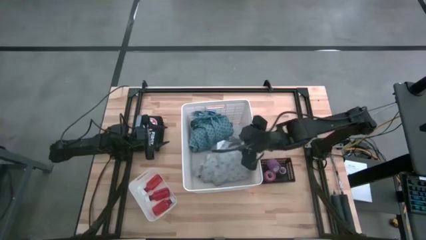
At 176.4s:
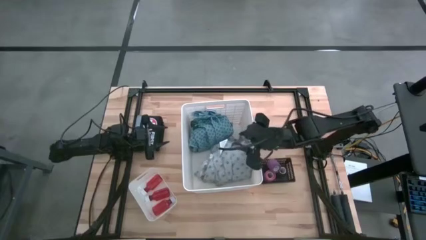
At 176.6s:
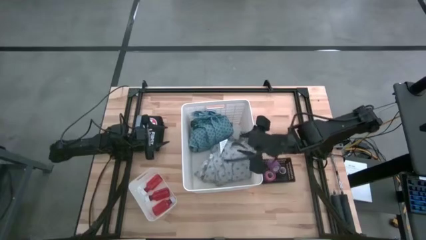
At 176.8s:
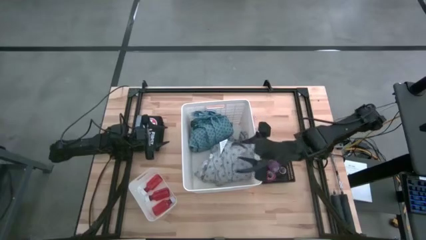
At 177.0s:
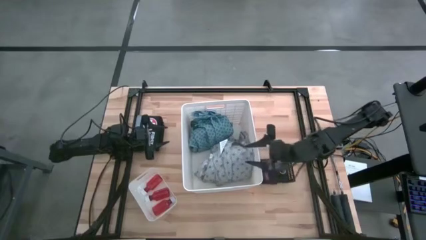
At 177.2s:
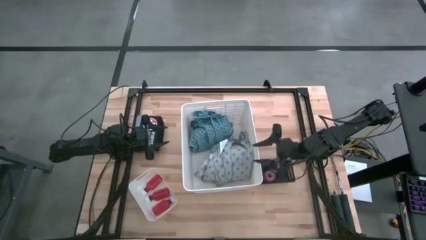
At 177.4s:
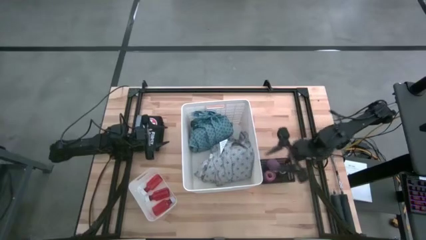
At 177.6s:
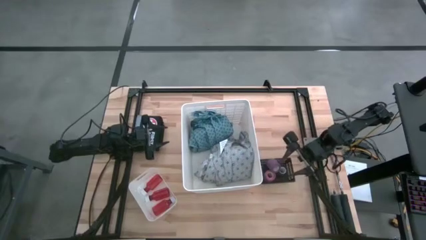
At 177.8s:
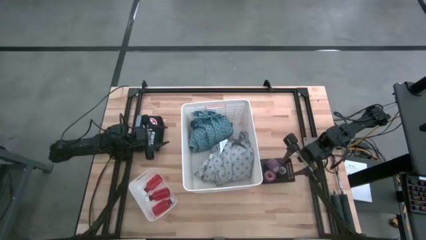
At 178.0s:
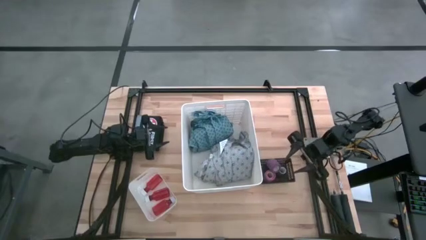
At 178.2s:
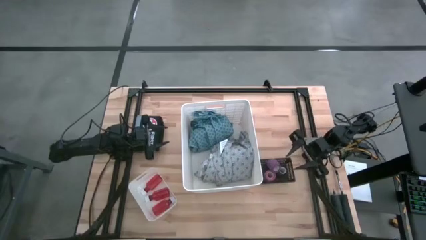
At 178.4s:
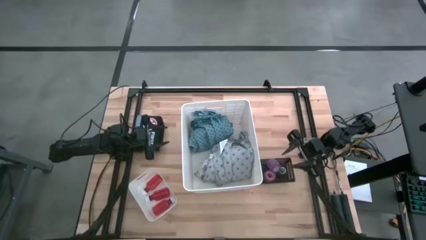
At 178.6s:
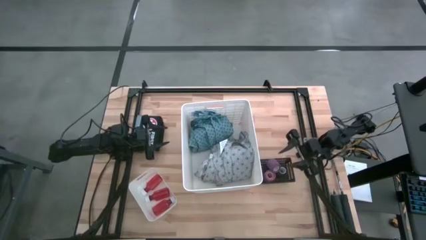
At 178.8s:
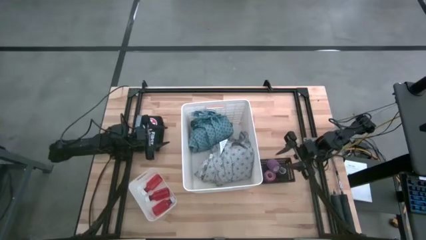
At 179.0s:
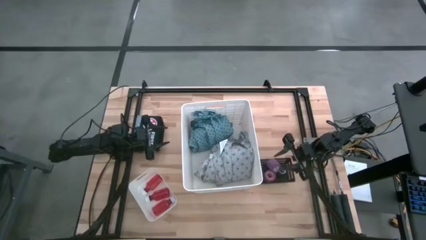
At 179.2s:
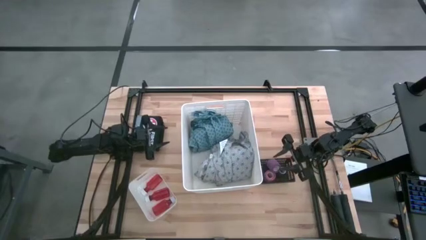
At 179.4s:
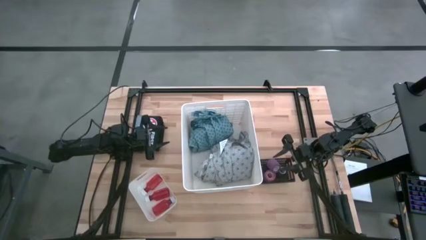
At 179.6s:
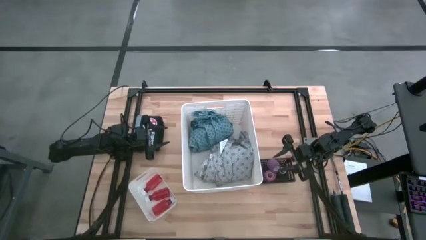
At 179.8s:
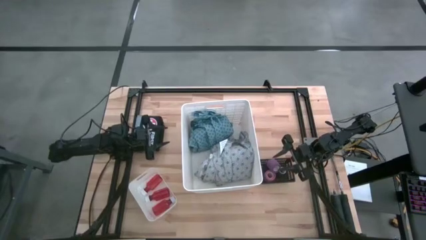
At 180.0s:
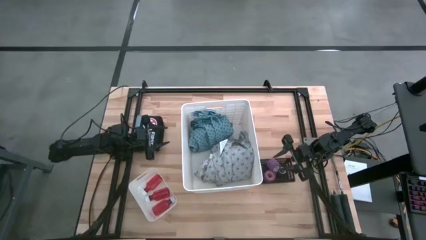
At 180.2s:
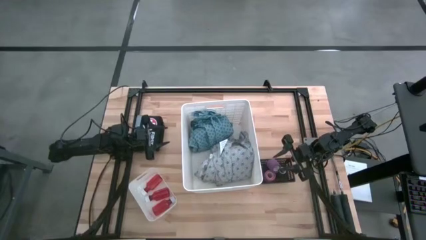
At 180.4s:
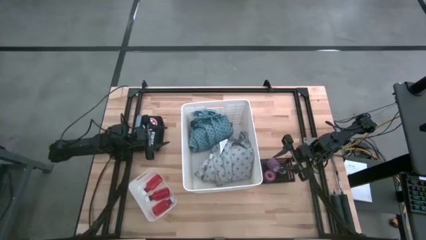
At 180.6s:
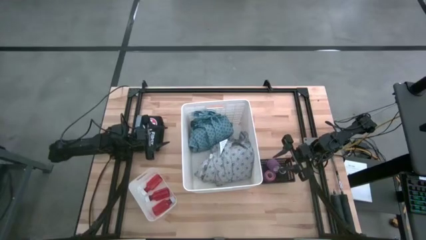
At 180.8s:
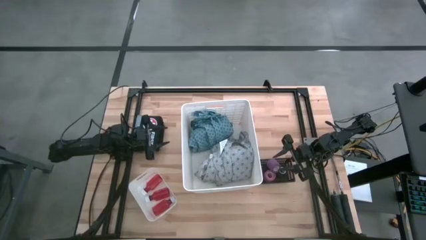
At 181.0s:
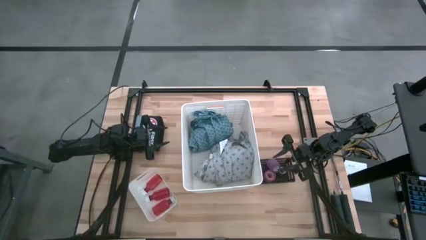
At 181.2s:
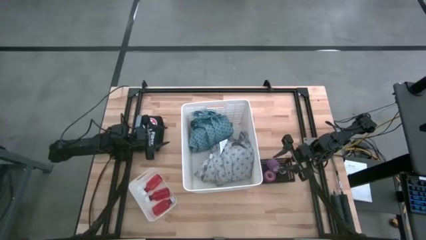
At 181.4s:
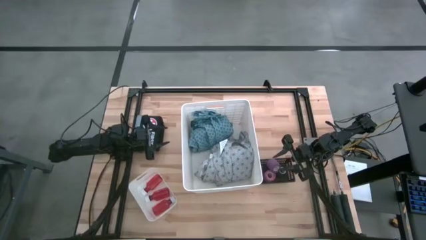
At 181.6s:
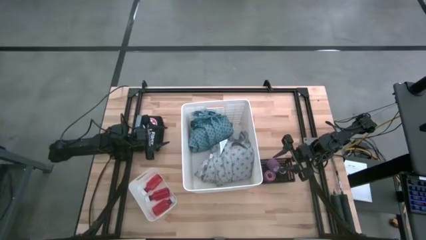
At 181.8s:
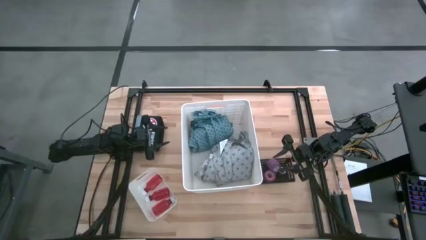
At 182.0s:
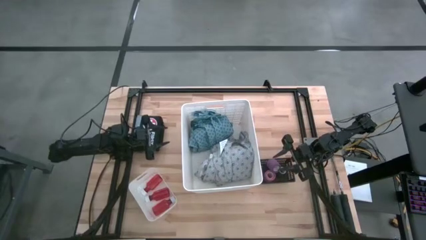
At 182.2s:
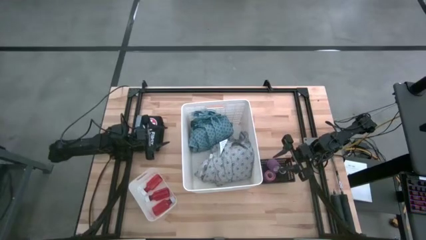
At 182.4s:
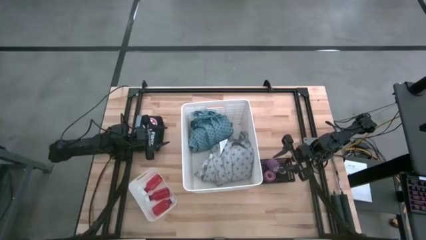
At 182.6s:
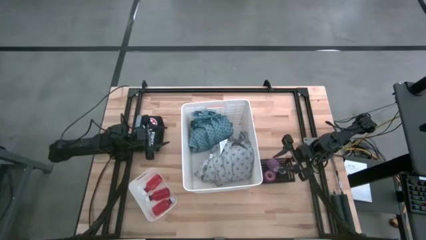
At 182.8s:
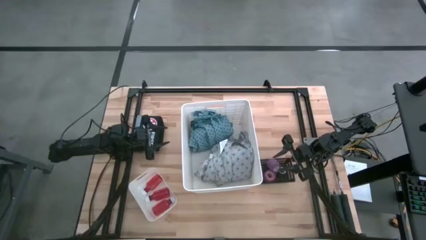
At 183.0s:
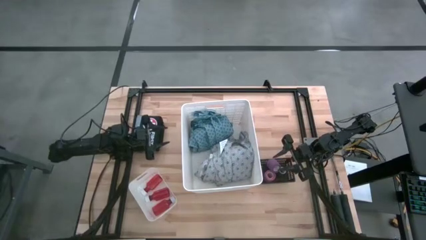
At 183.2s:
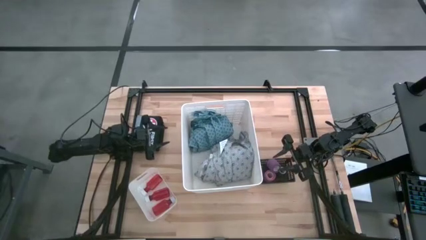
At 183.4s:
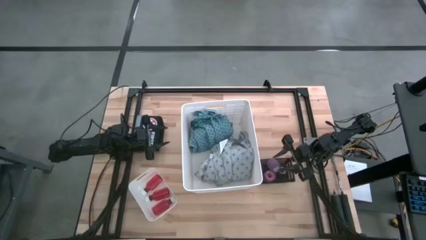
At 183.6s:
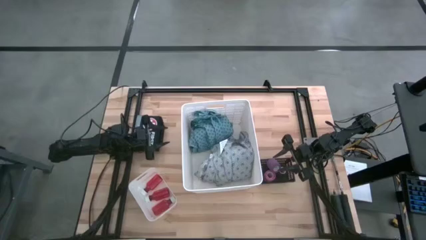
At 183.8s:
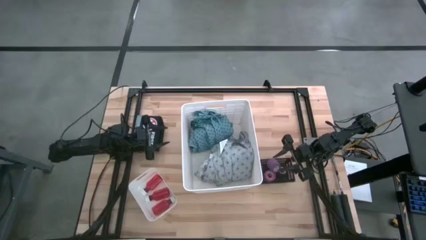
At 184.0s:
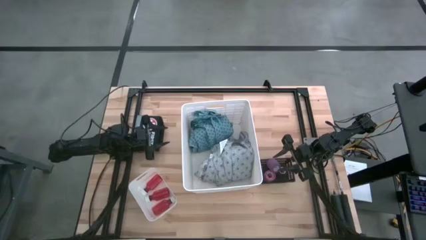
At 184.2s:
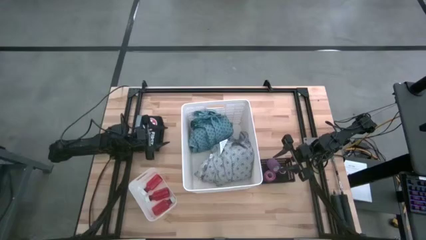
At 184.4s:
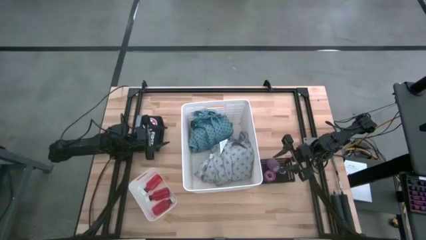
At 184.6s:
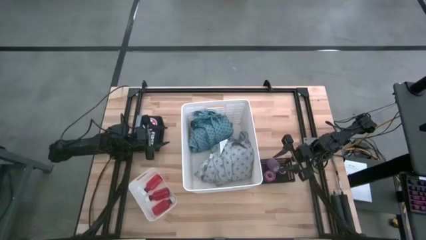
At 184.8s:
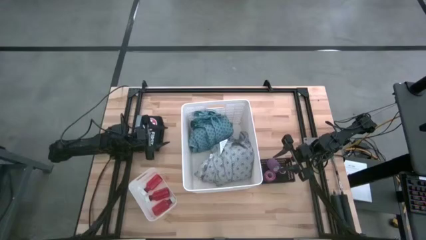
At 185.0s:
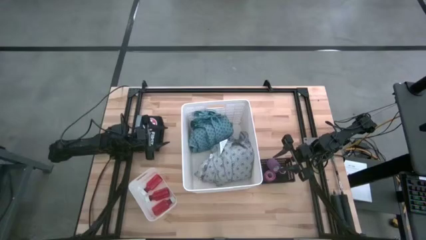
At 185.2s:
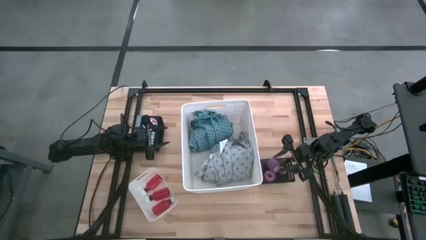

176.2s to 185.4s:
Task: Pick & place medical supplies in basket/bin
Return to Home Position

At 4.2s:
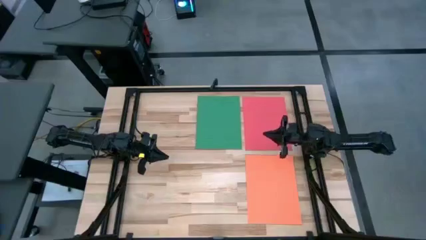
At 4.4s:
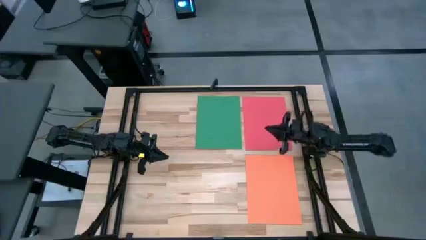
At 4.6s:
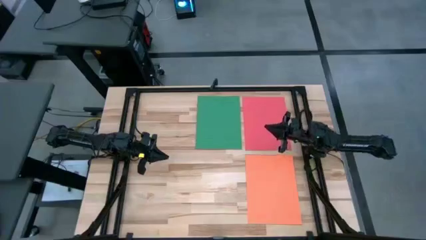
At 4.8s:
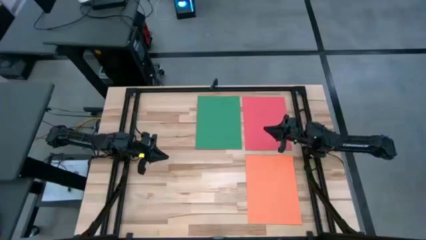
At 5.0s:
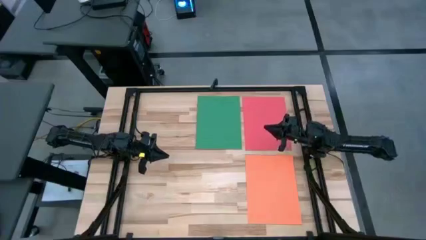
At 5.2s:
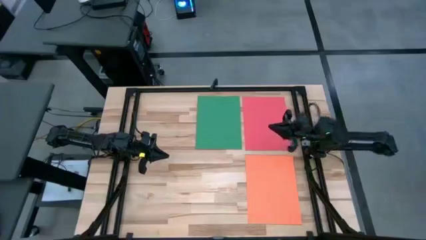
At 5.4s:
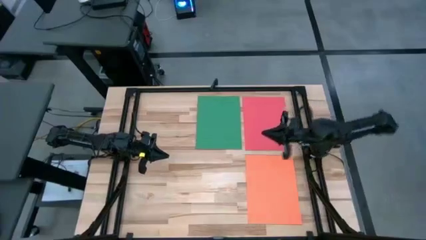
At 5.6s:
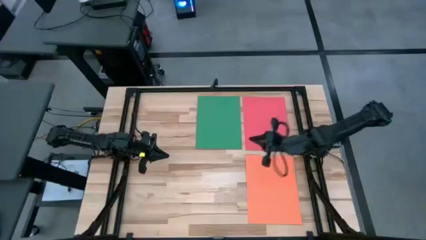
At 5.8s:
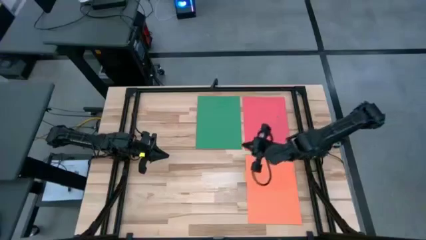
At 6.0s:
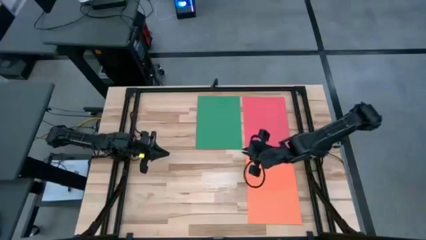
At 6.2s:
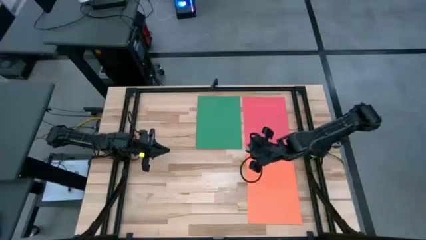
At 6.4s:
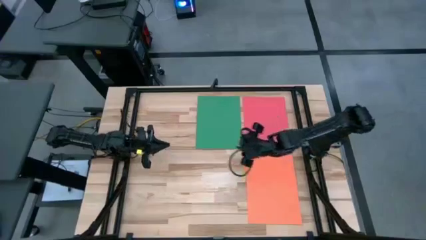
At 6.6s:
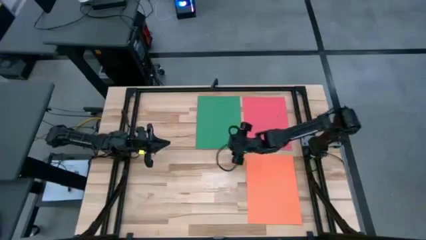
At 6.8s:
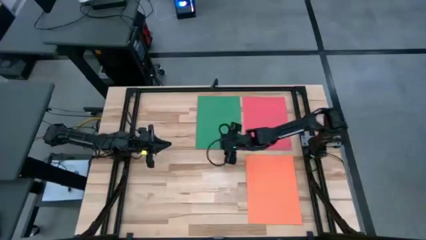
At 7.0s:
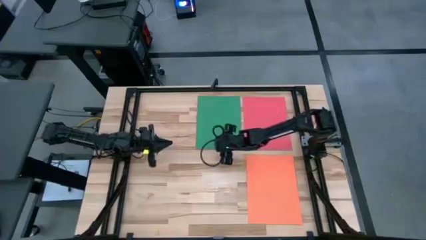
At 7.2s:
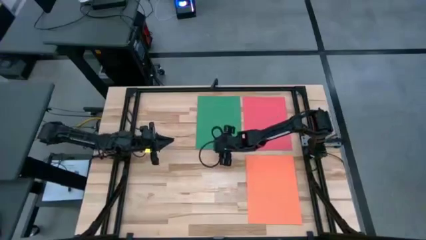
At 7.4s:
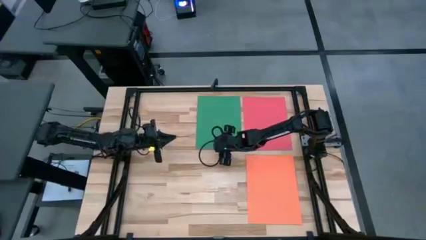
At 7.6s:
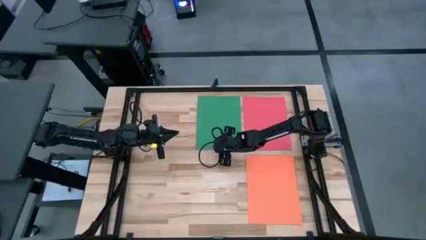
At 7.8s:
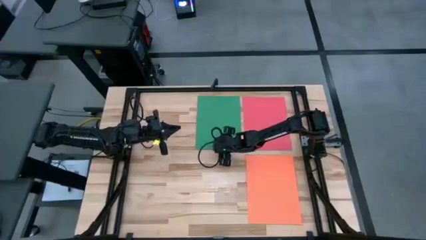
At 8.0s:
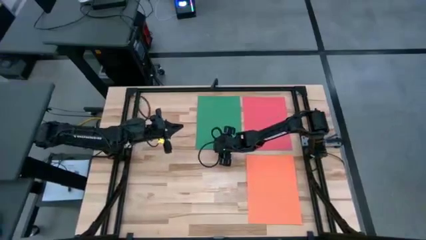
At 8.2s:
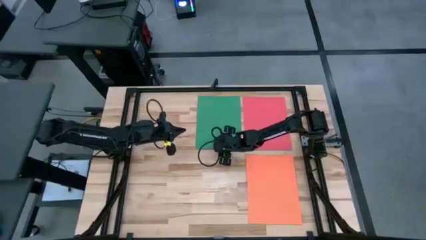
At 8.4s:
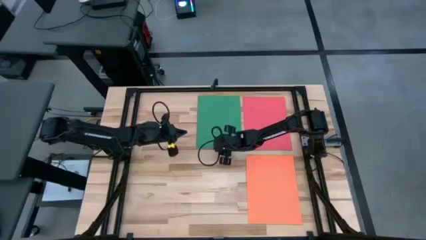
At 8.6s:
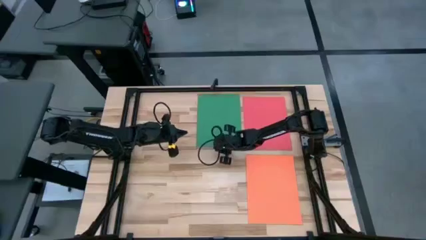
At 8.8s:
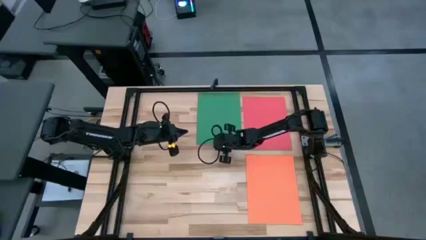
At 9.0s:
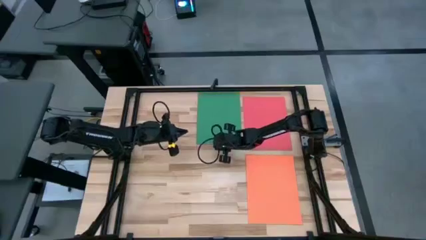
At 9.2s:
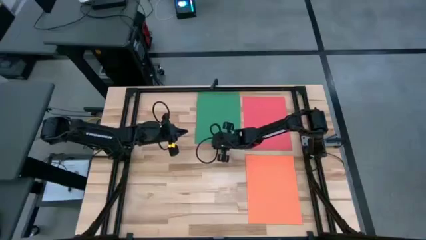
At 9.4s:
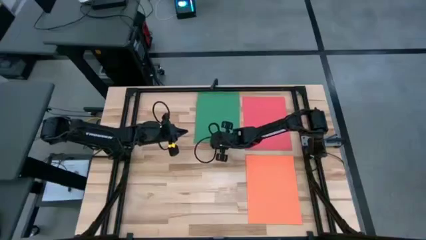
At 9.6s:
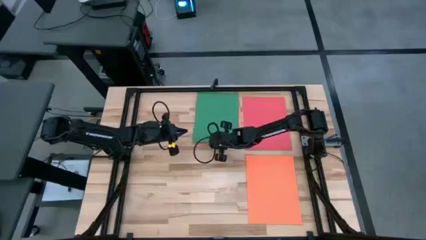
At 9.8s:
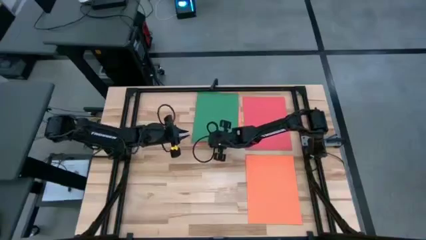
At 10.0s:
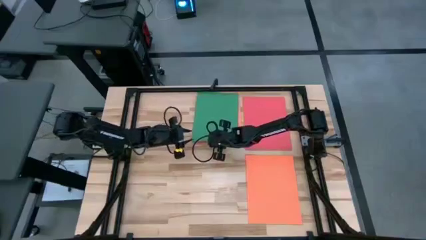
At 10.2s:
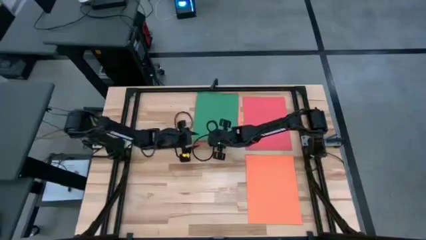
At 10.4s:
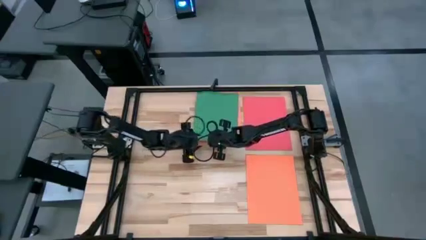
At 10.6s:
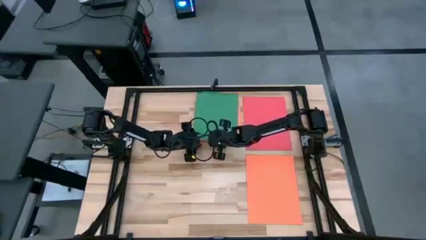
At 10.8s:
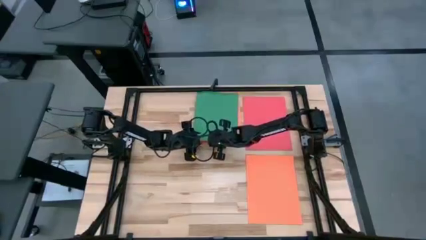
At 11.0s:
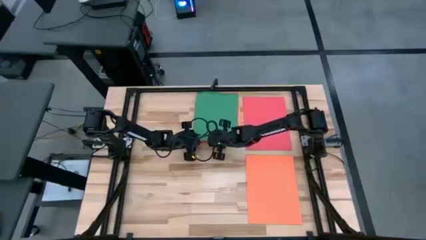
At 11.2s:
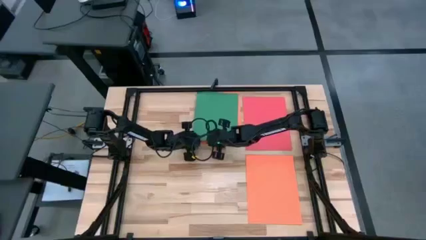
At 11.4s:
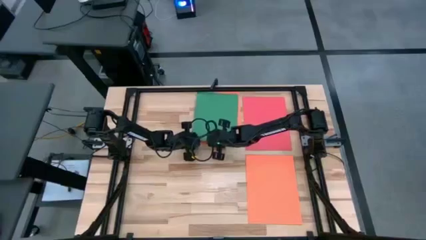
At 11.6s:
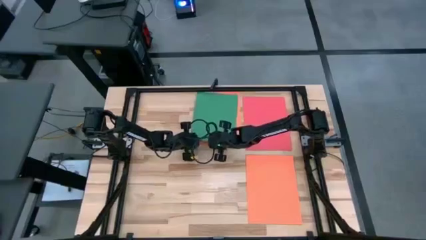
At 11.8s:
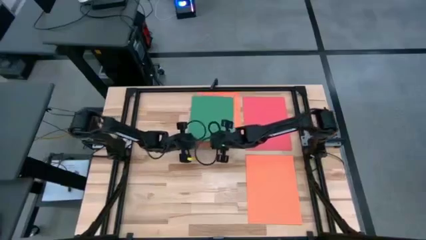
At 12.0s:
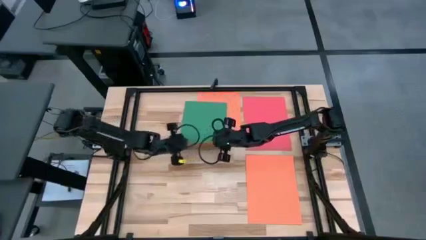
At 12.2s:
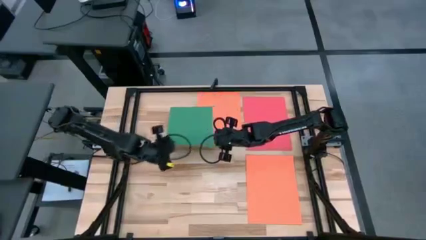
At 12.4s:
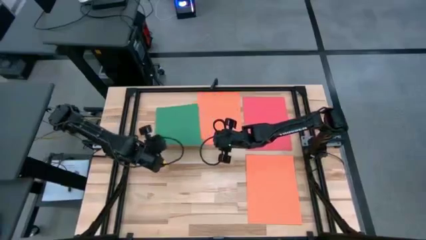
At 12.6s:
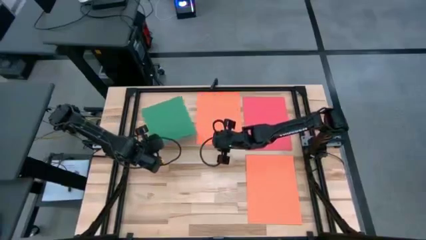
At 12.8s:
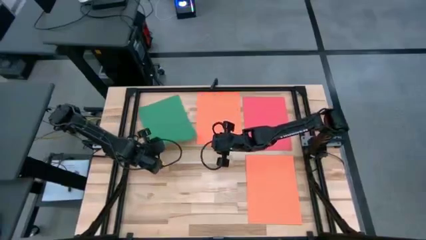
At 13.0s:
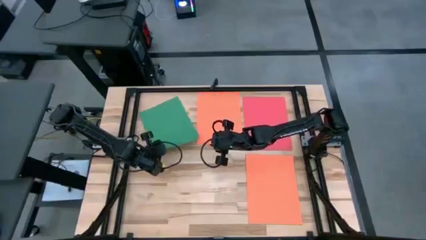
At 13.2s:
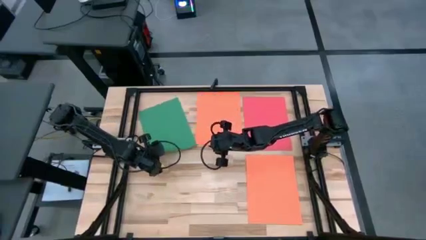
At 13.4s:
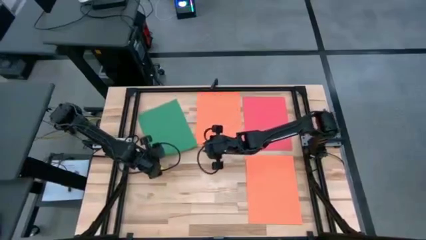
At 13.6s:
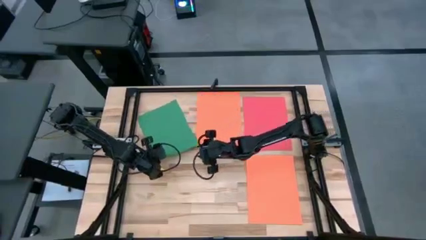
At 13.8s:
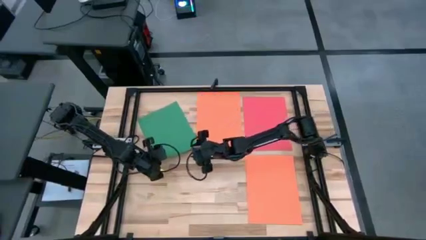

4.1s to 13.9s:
Task: Organize paper
Put the green paper on the top left of the table
